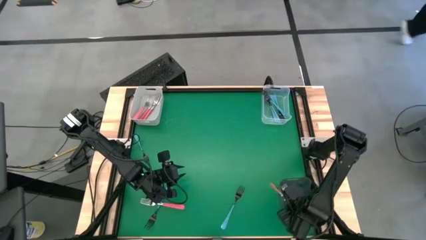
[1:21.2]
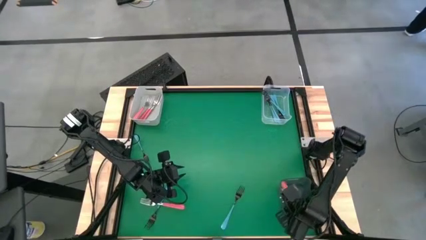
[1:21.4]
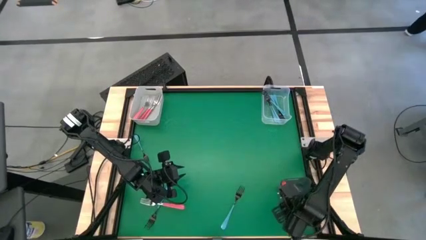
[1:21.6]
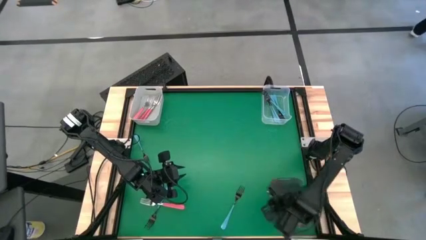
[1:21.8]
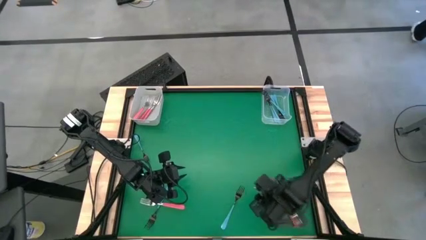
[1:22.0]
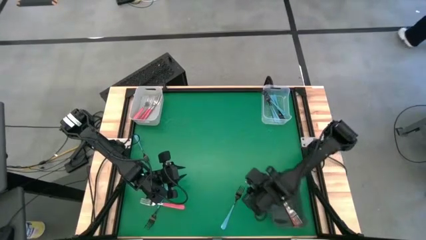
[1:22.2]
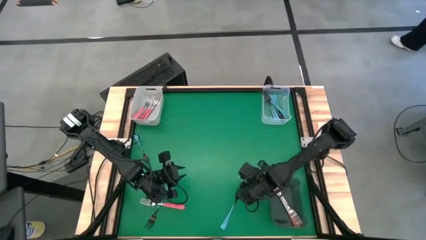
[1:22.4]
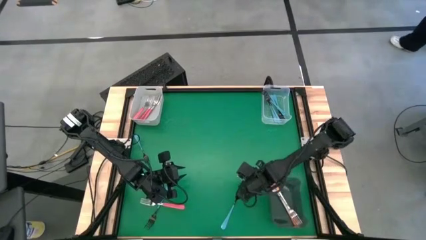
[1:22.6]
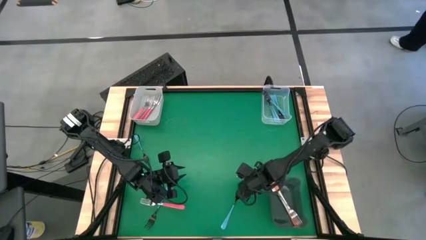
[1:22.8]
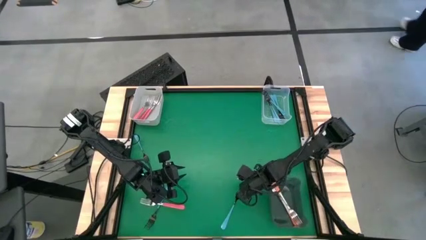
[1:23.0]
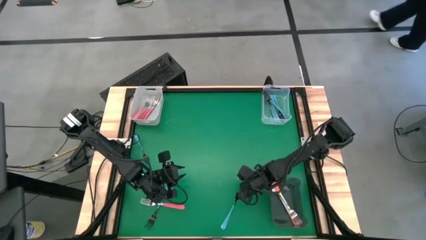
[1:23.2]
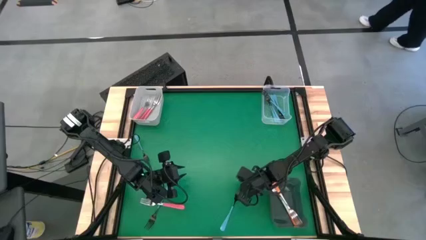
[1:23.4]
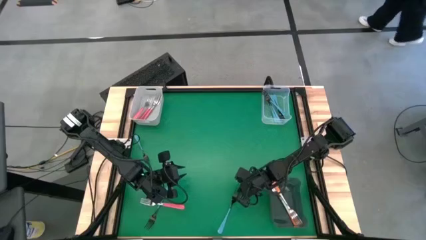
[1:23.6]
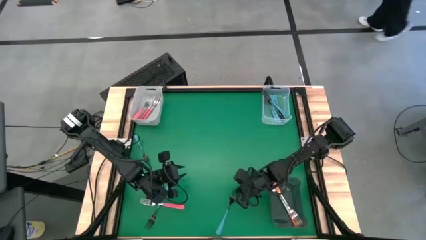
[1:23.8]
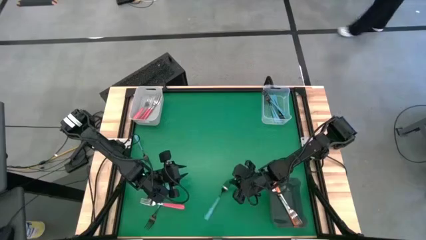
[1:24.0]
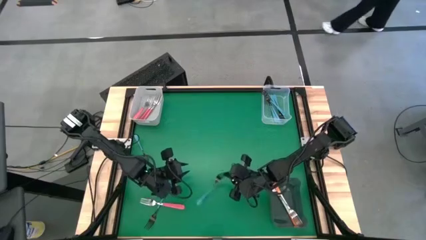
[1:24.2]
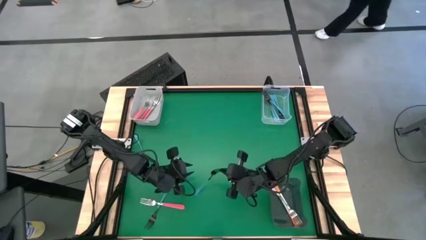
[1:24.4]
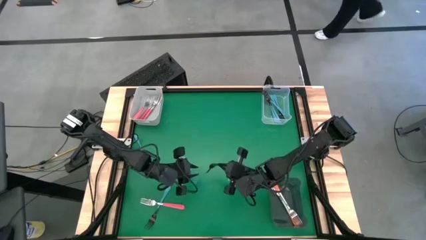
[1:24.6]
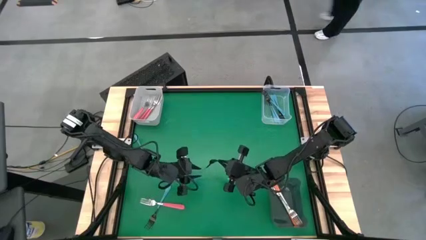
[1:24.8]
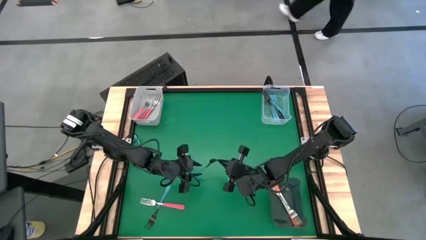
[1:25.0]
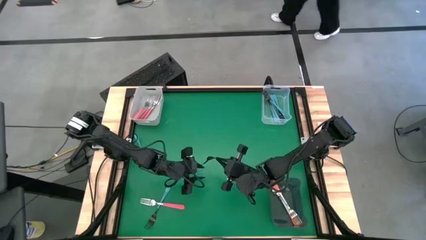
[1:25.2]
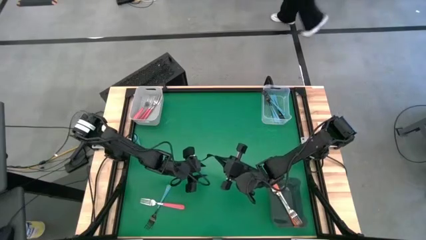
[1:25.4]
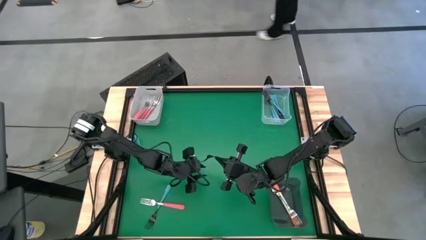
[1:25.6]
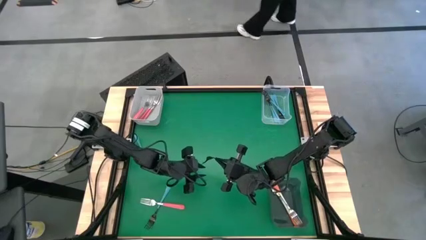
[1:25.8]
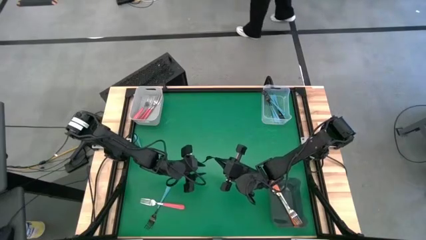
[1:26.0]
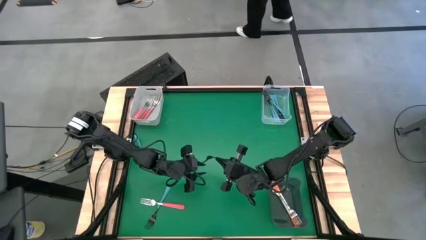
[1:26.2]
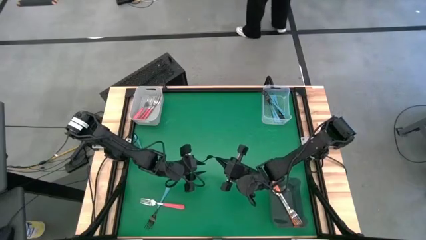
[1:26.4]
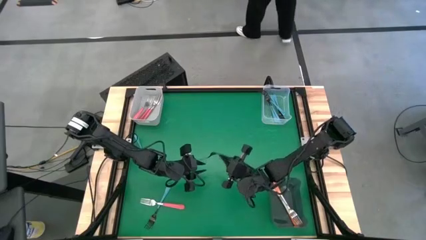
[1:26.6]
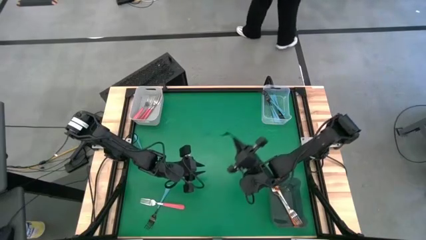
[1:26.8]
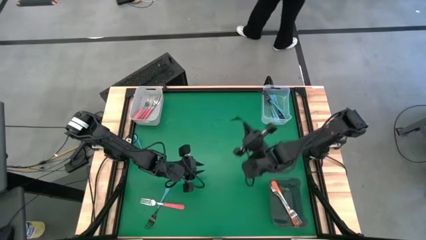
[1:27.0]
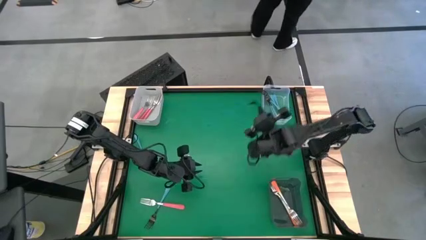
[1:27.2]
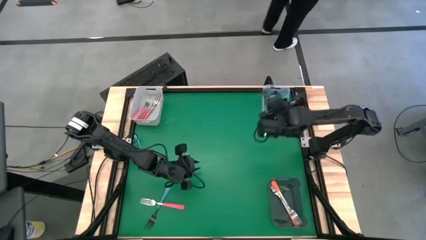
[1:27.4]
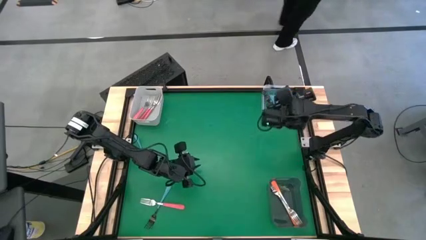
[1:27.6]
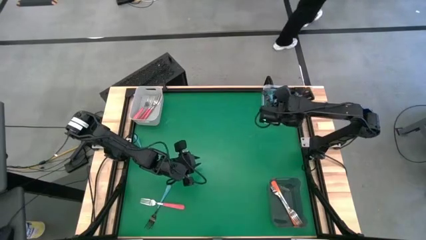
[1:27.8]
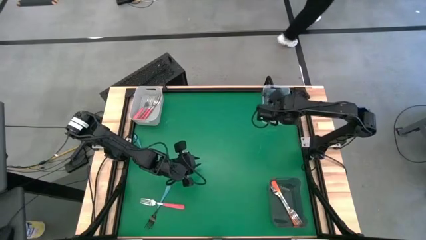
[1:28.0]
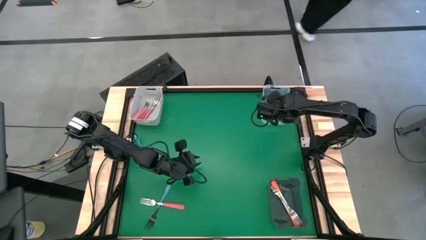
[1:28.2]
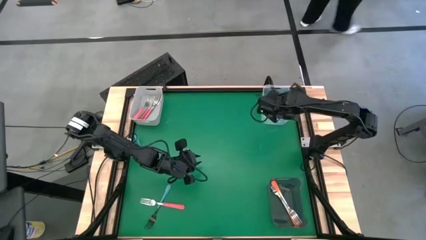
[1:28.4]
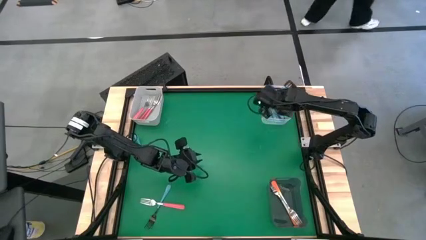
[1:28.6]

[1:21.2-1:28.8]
Task: Sort silverware by color (type)
Put the blue fork into the transparent bin

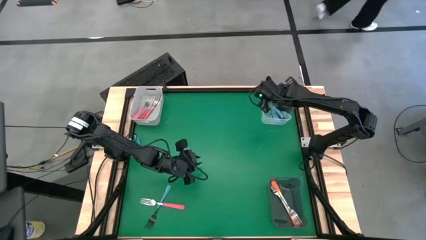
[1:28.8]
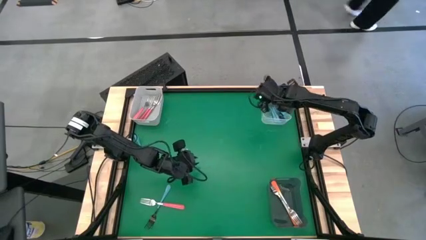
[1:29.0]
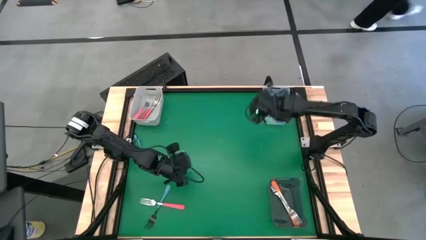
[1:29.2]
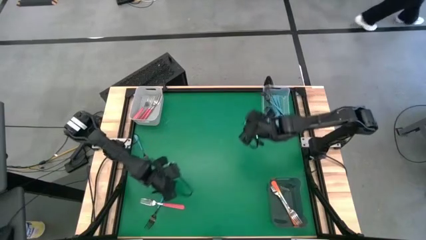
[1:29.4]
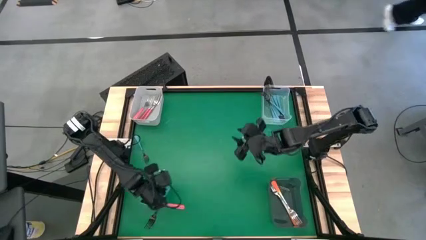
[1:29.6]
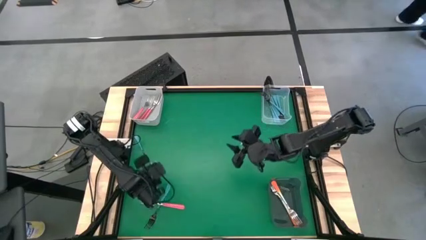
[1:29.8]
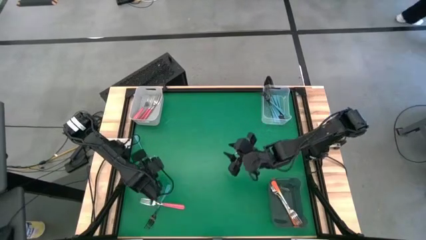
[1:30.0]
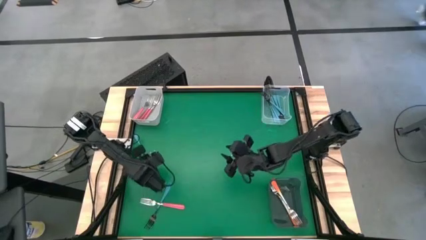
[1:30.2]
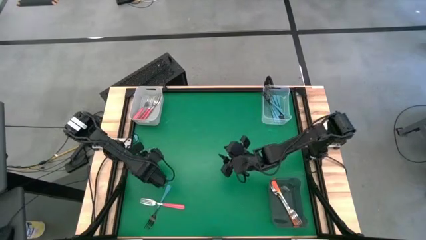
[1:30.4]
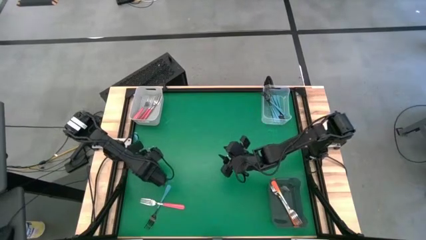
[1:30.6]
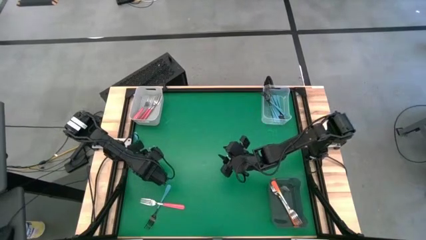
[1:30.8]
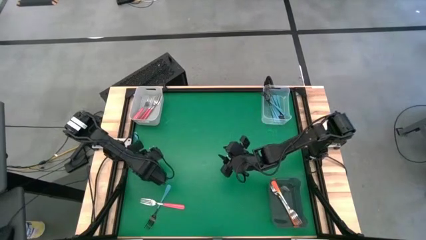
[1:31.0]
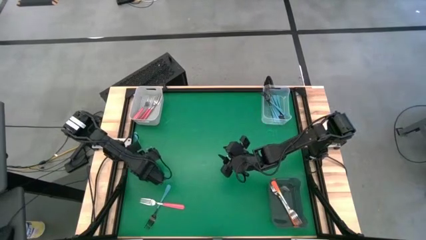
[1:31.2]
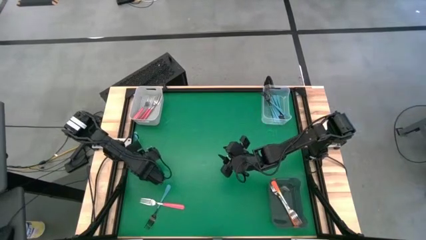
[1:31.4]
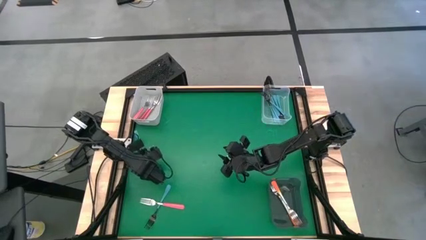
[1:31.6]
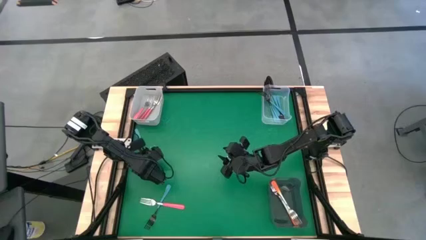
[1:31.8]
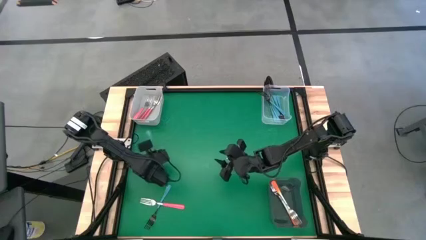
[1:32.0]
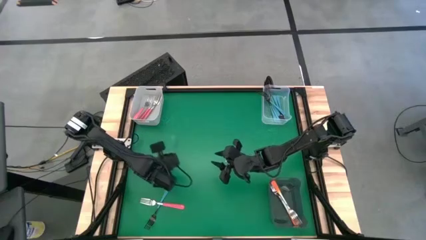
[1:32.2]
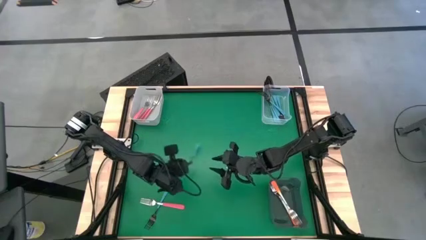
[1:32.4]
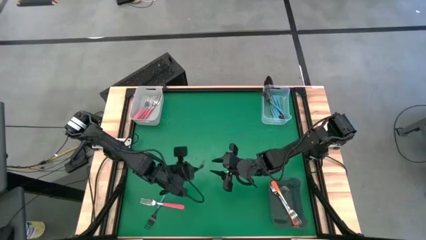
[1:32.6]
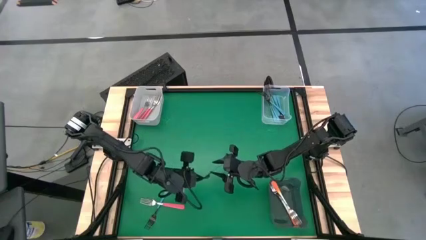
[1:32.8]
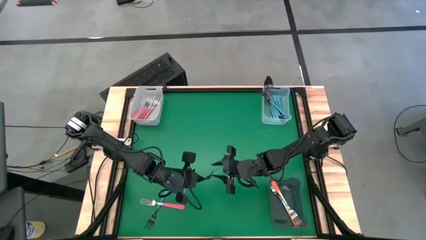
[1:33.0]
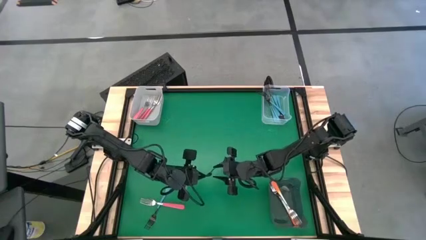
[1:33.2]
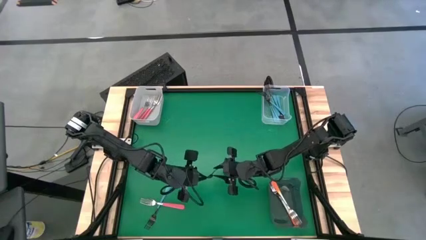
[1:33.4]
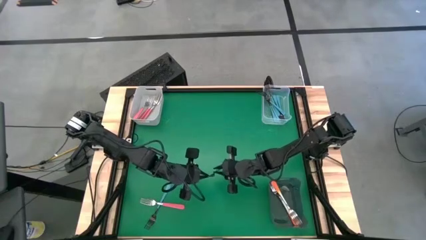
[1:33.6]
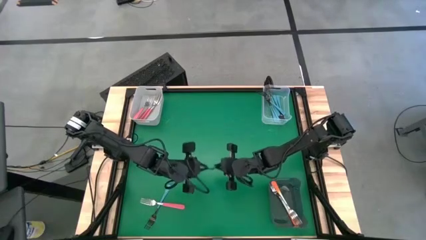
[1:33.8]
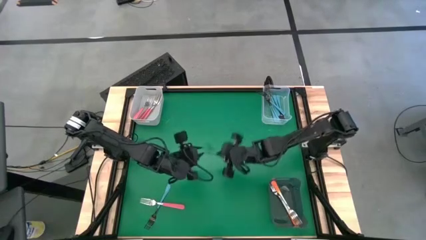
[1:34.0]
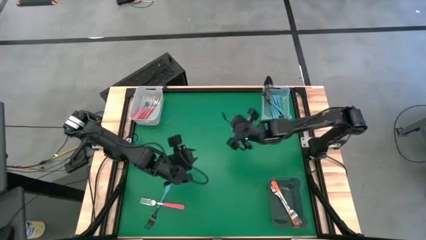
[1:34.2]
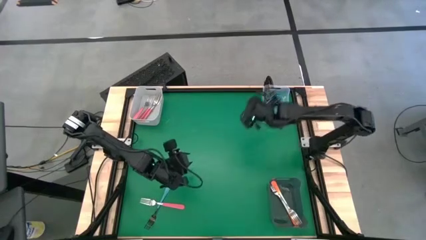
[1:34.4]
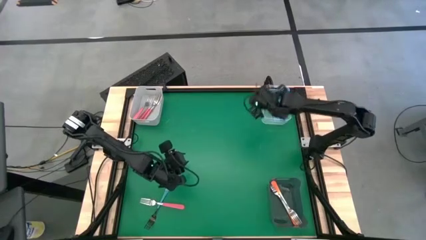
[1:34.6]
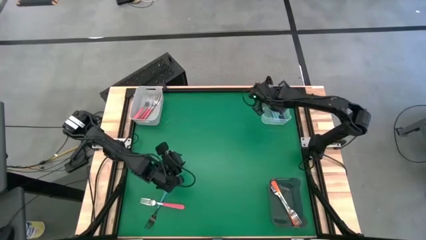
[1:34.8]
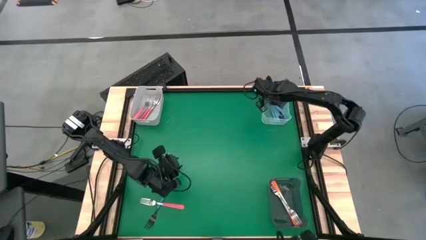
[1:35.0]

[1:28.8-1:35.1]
Put the blue fork into the transparent bin

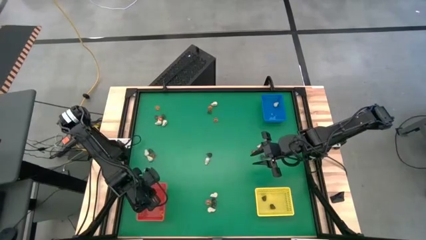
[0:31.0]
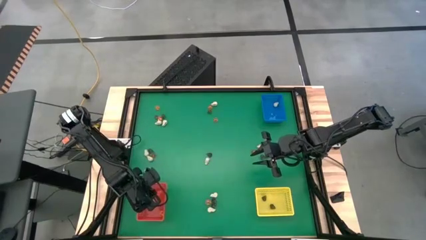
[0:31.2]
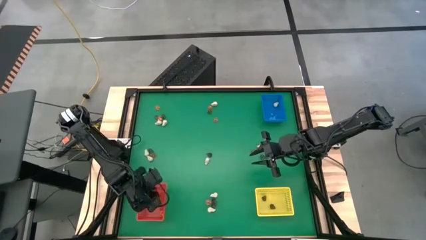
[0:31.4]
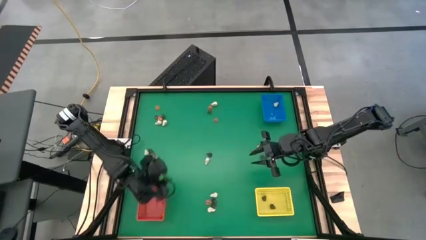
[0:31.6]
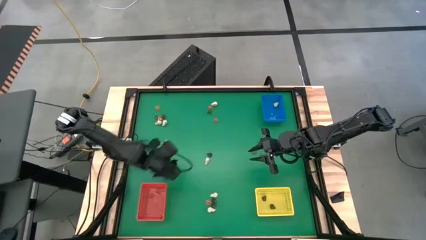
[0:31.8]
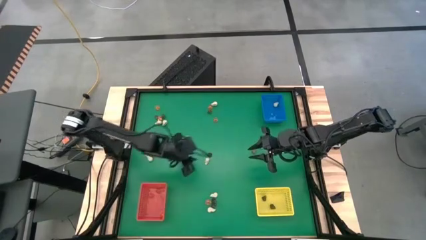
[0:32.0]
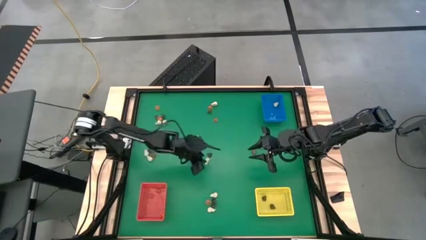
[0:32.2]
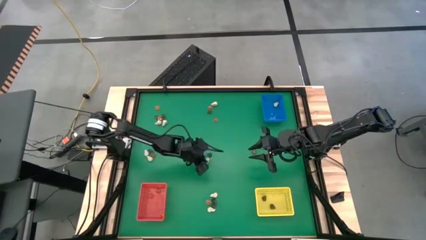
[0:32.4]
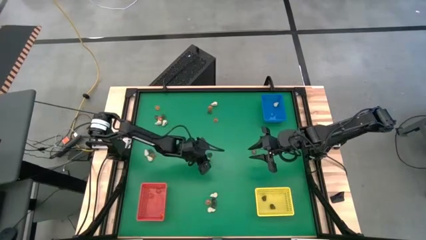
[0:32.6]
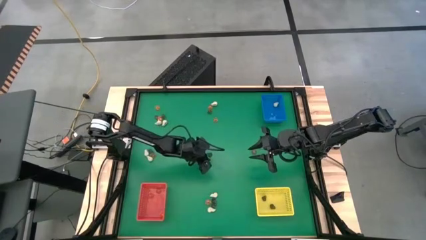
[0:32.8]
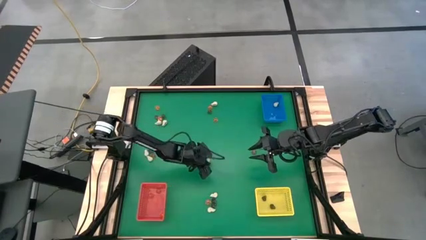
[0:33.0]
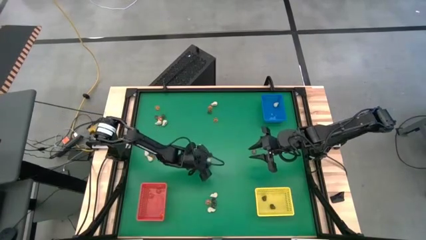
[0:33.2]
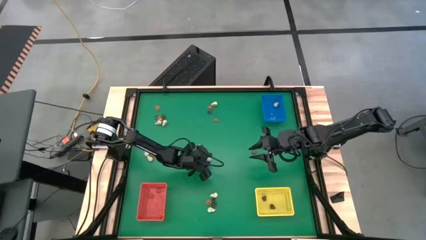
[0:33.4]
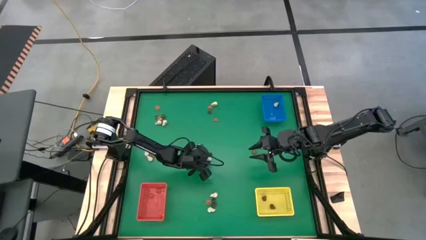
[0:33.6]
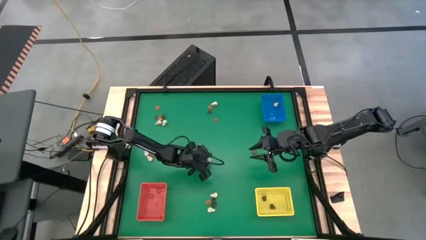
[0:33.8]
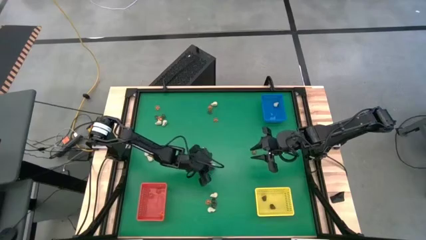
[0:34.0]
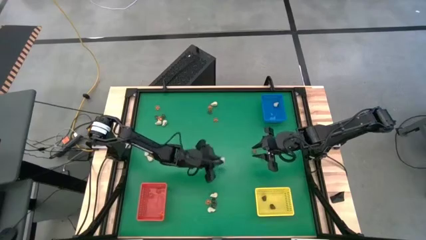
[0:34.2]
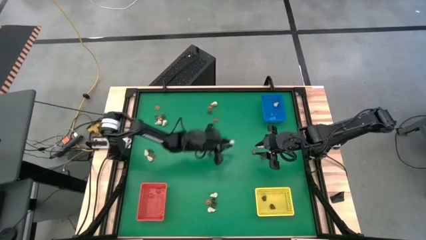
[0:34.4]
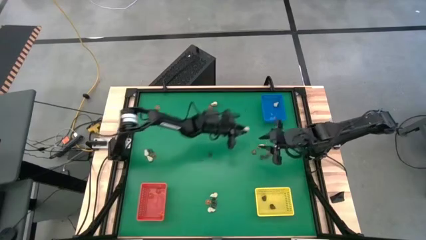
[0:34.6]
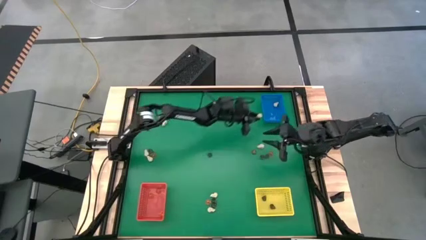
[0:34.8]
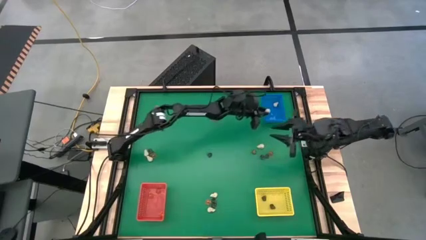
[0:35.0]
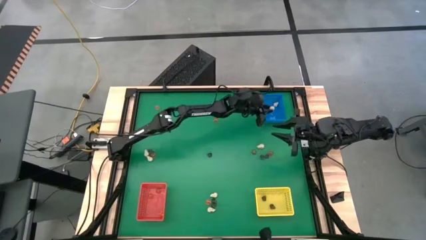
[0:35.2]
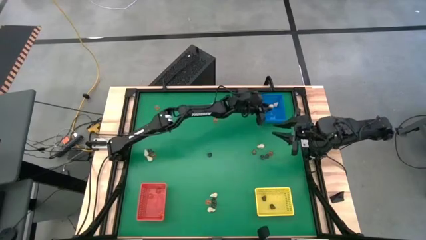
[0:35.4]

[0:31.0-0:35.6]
Task: Sort Halloween decoration
Put the white skull toy into the blue bin
